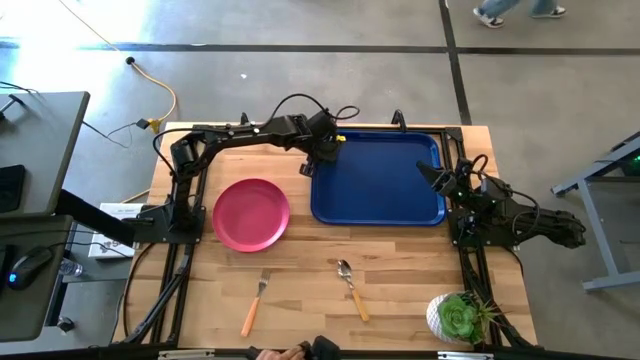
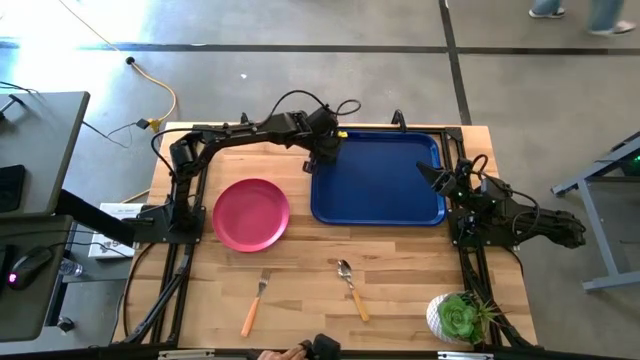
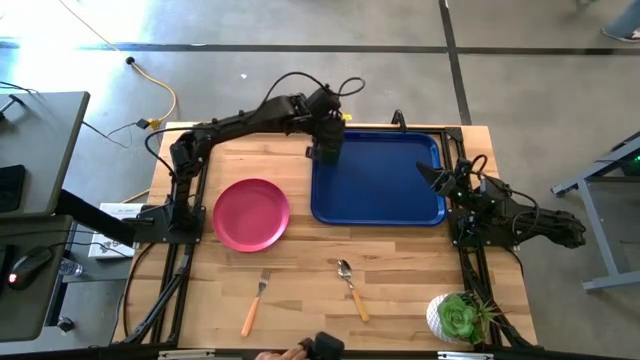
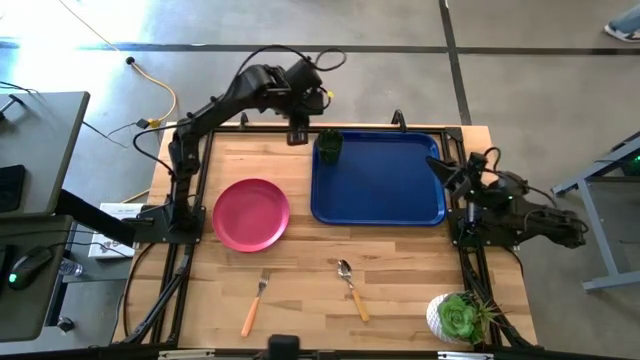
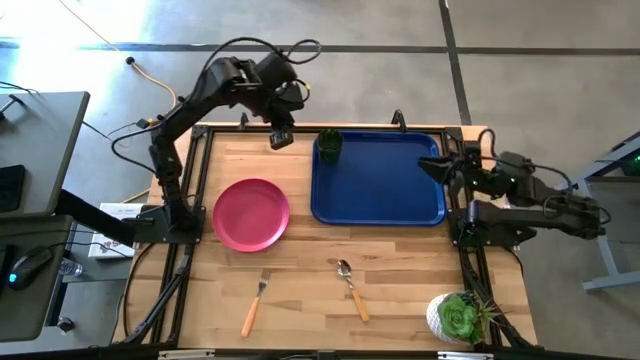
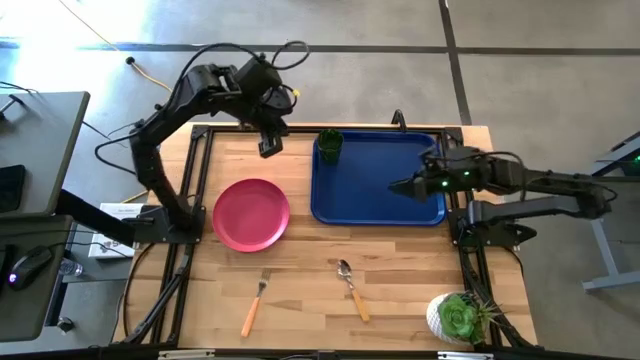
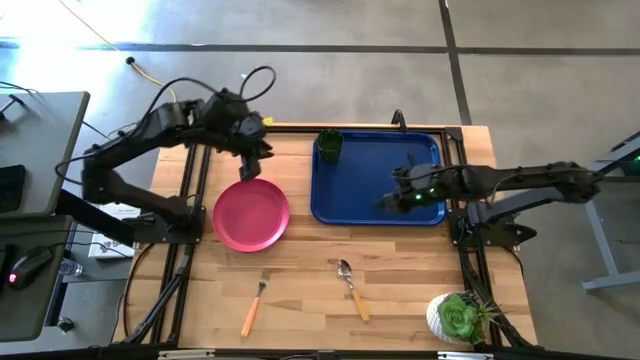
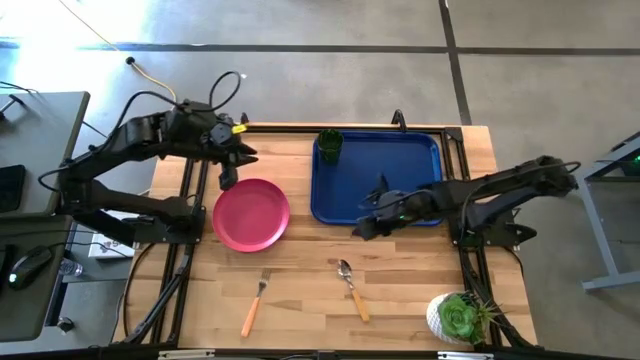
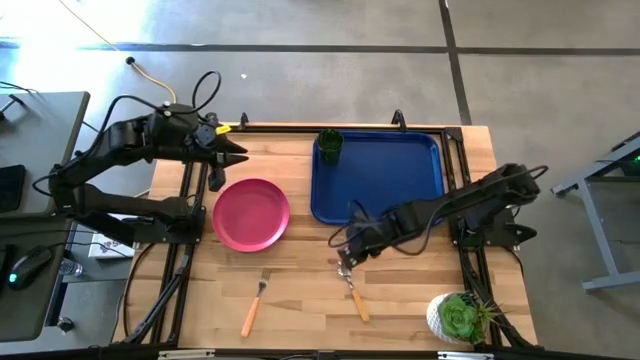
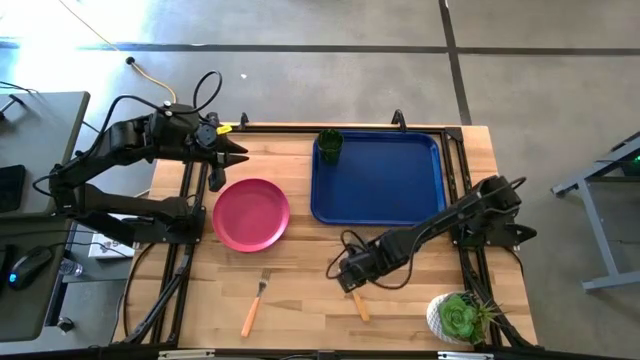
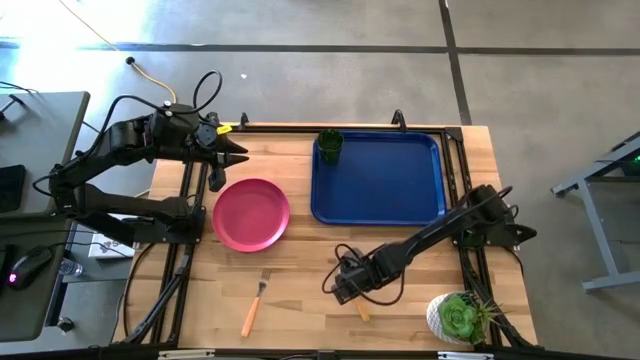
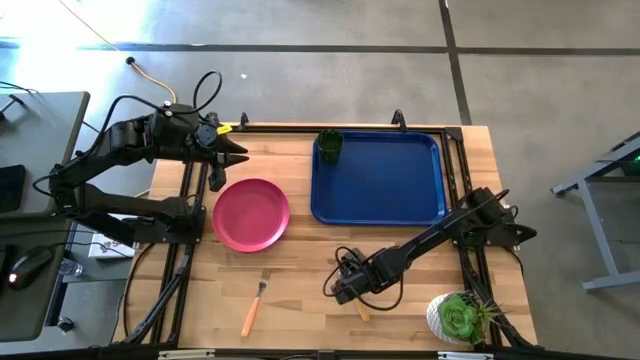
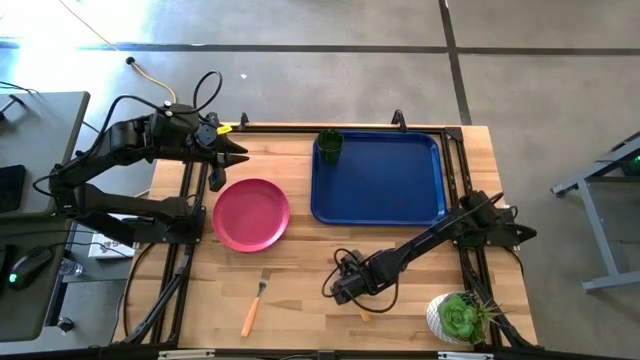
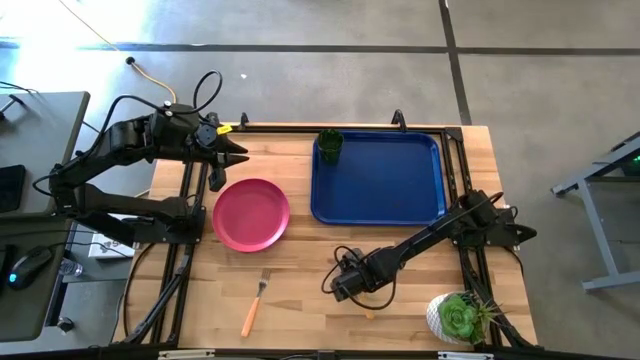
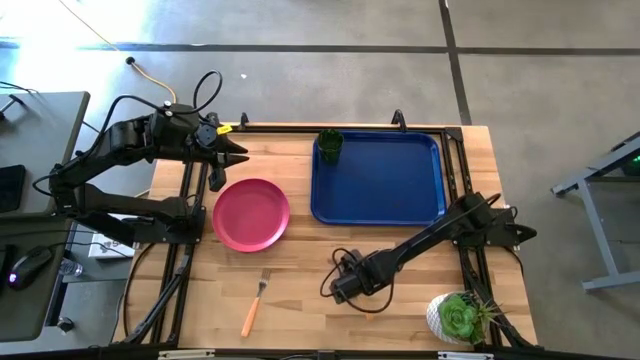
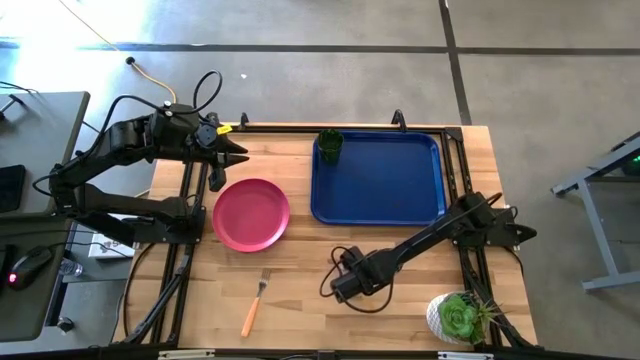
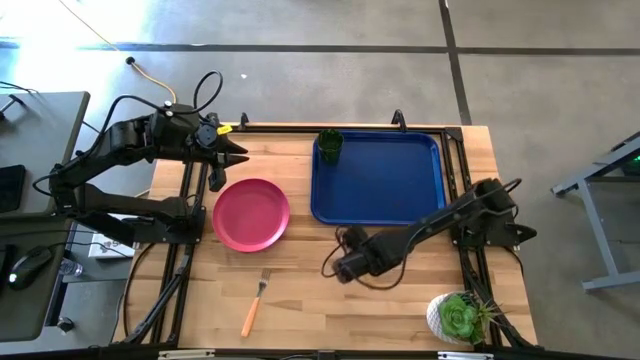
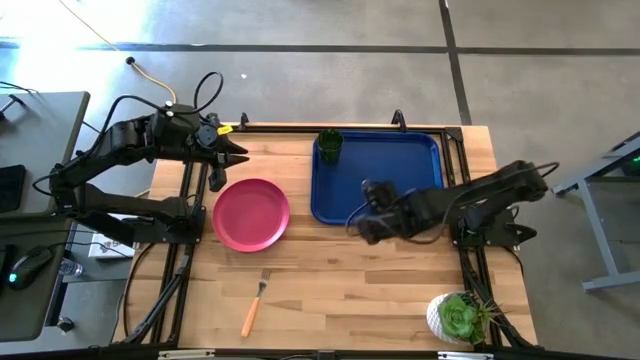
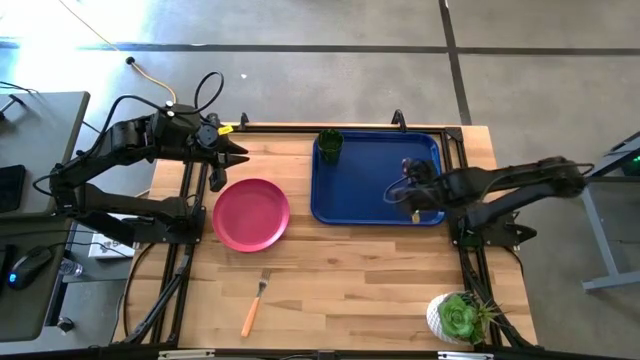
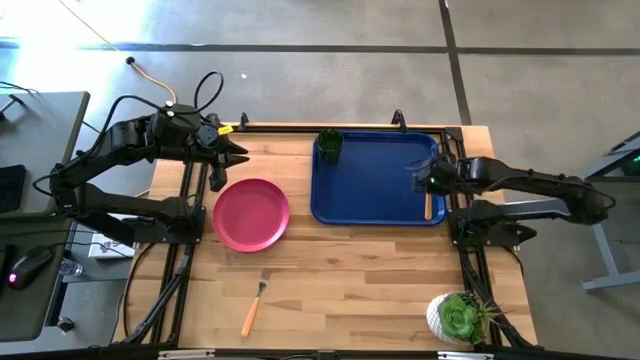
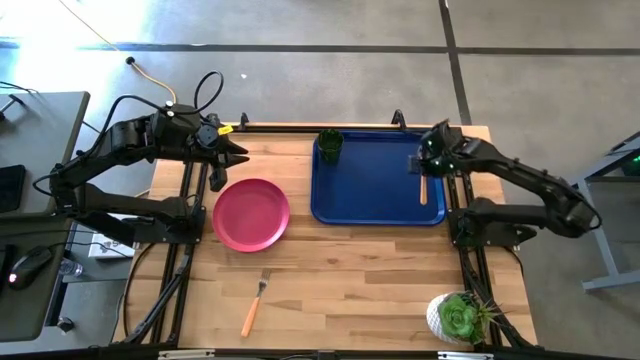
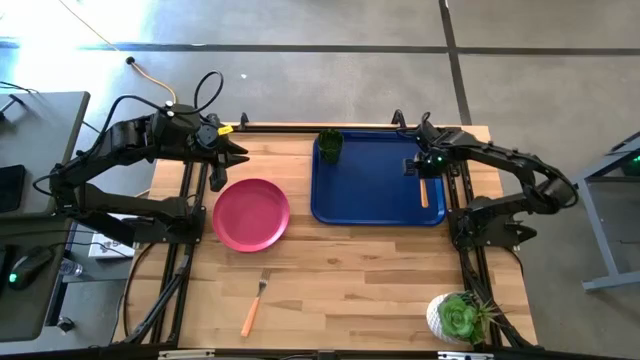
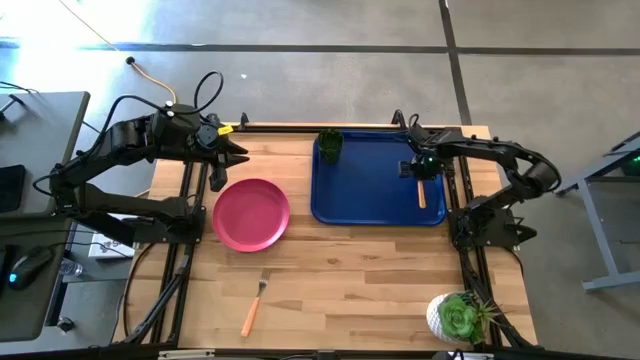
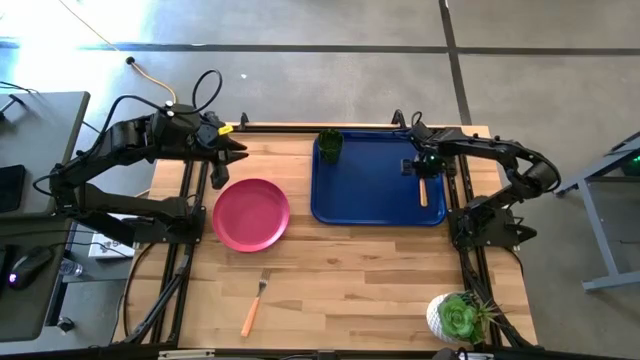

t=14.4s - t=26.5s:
Task: Pick and place plate/cup/fork/spoon on tray
Put the orange spoon on the blue tray

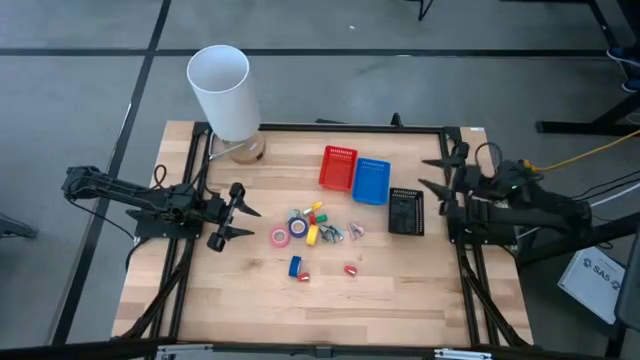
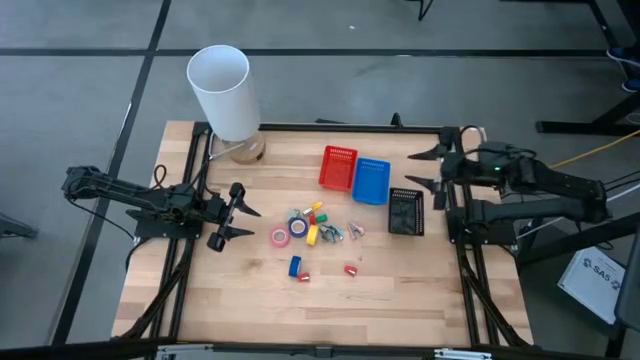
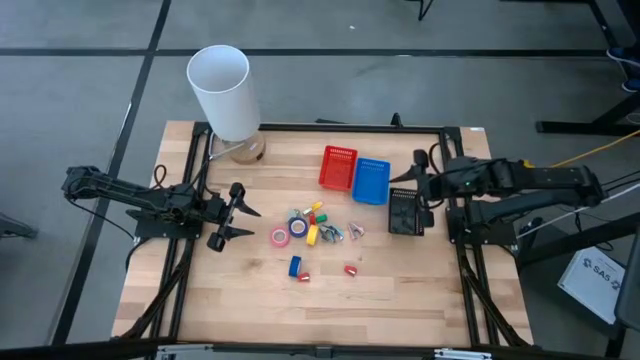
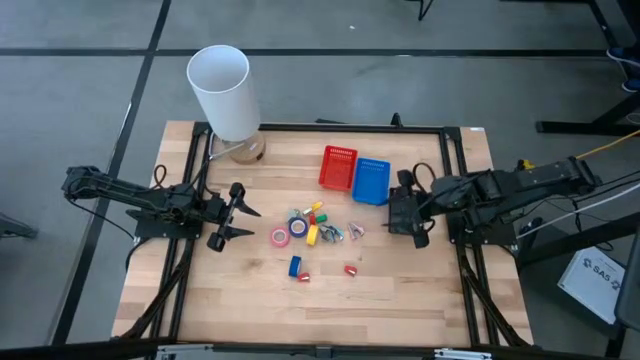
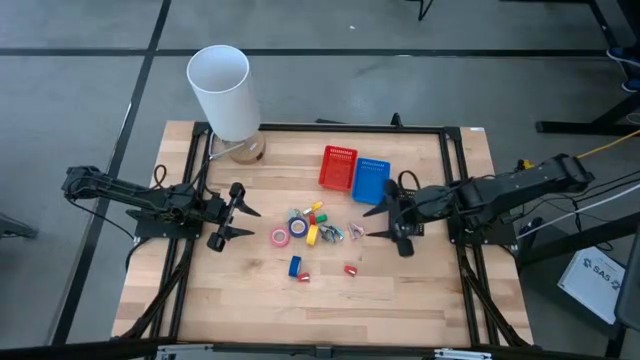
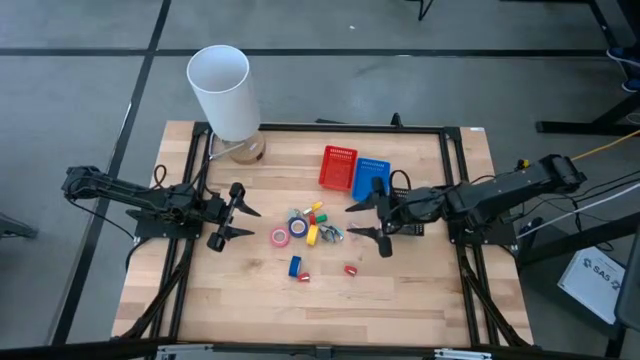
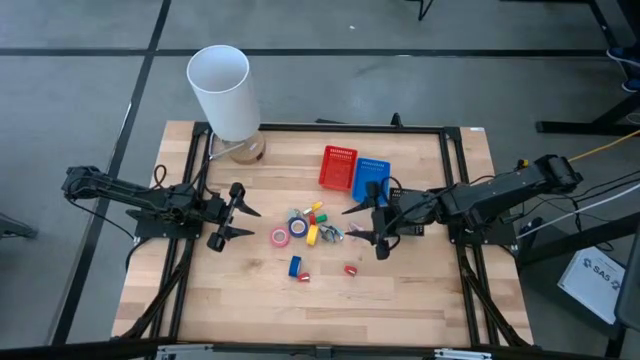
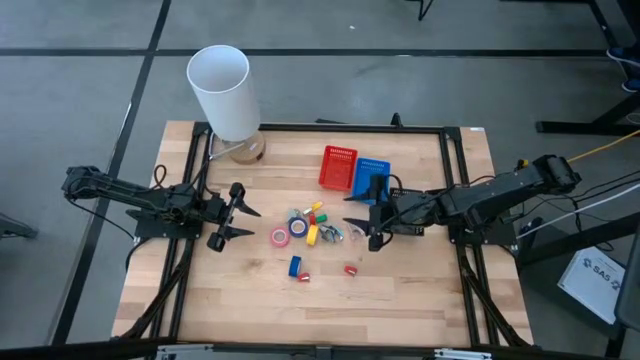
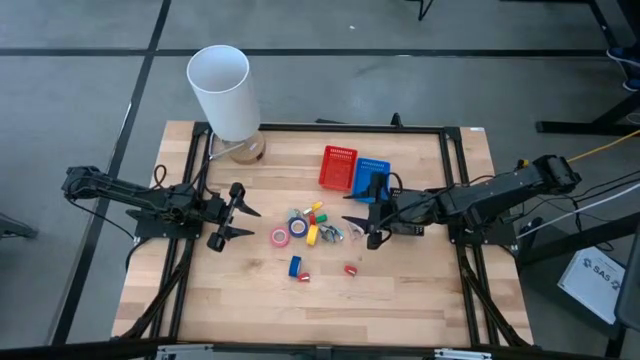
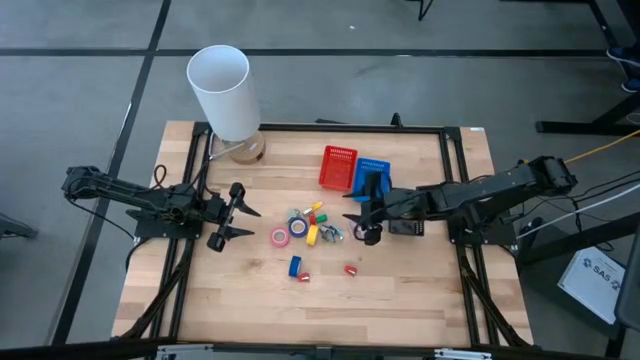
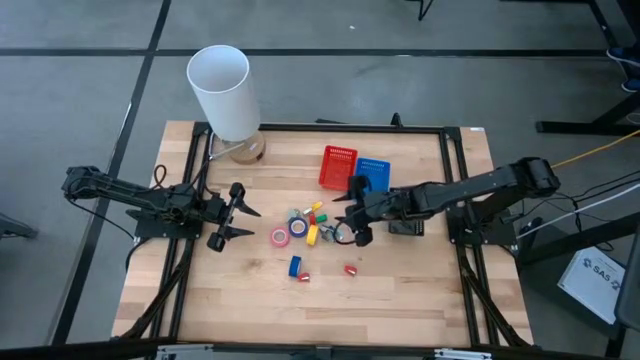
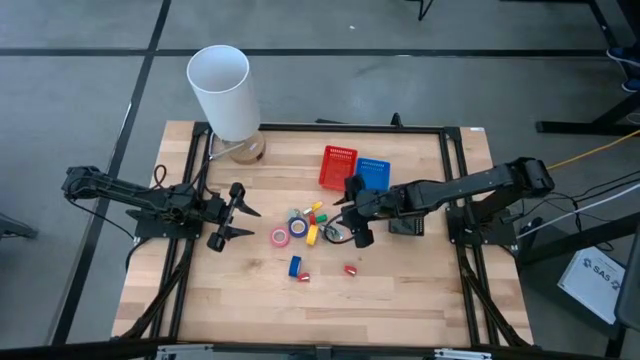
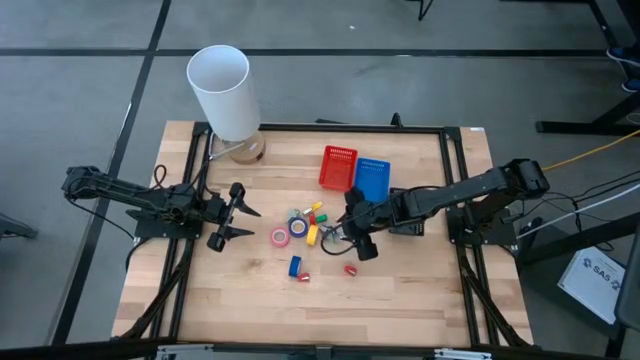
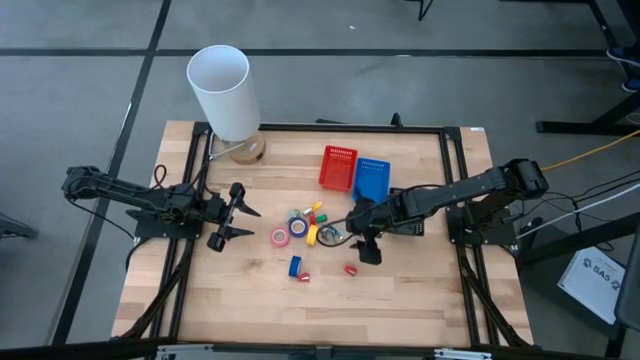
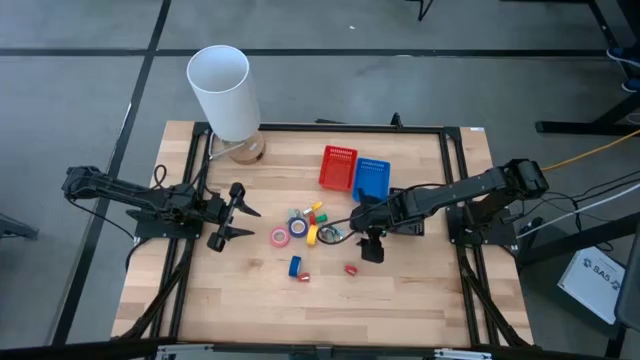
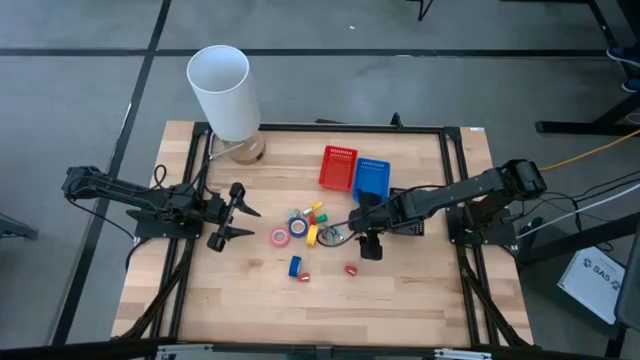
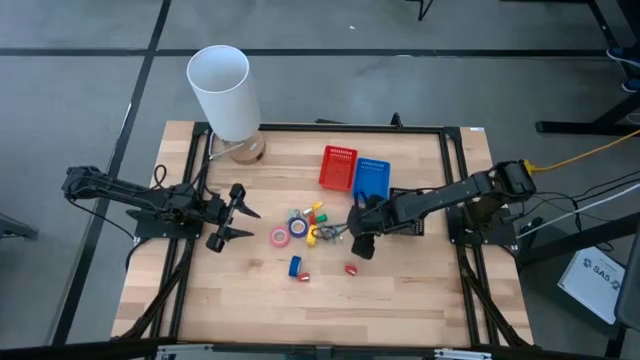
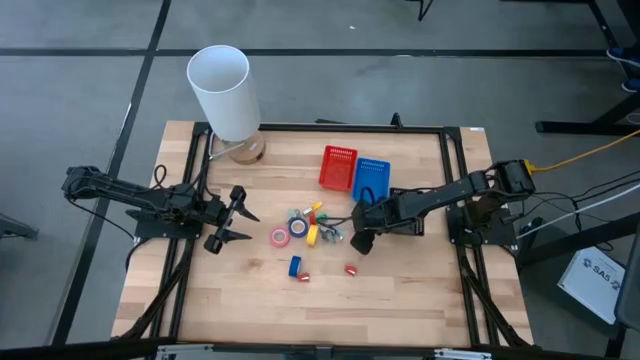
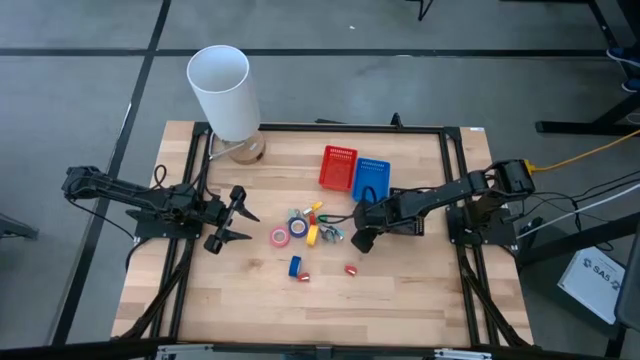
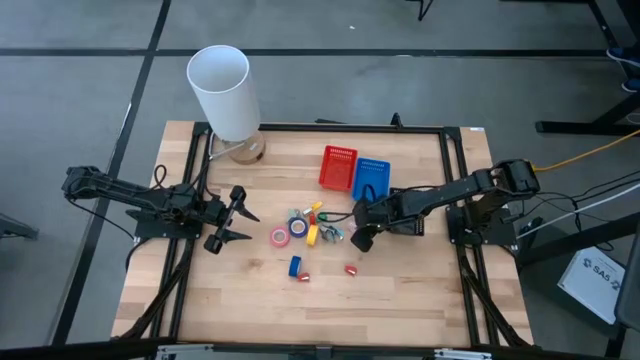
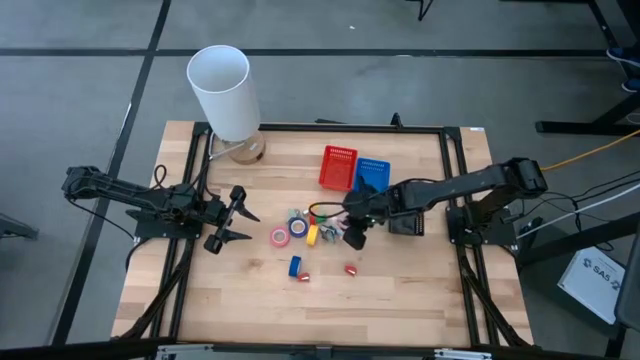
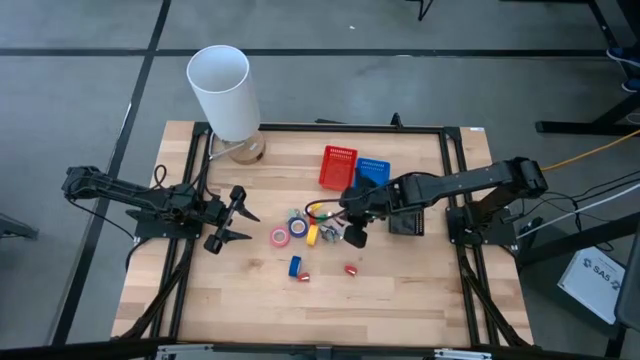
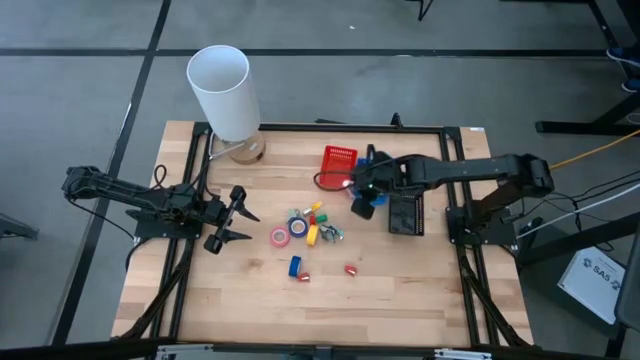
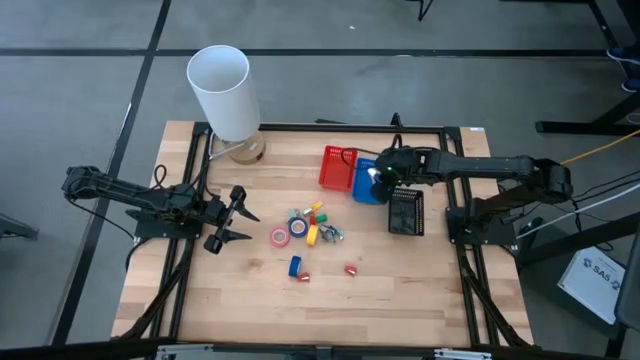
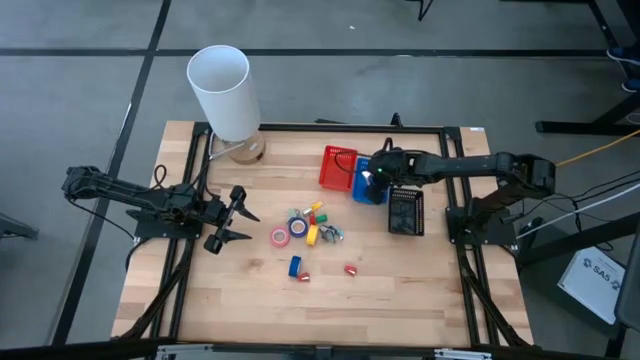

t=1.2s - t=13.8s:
Task: Pick and place Stapler, Stapler remover, tape
Put the pink staple remover into the blue bin
